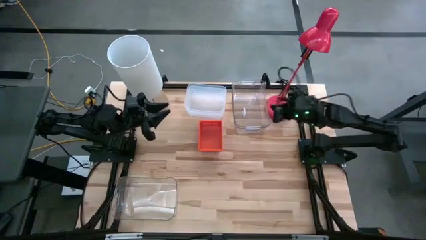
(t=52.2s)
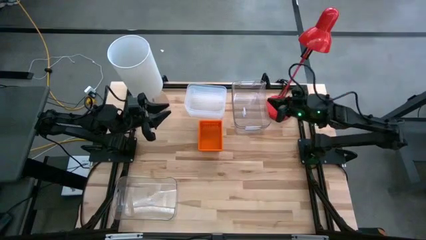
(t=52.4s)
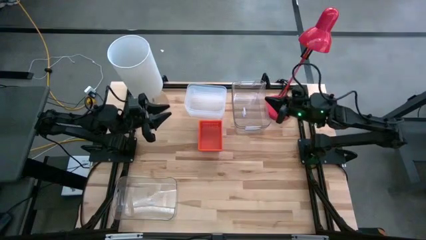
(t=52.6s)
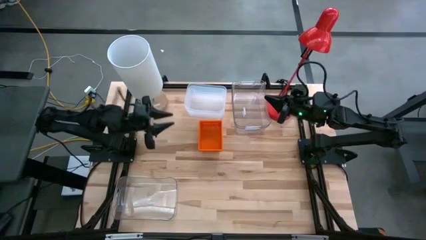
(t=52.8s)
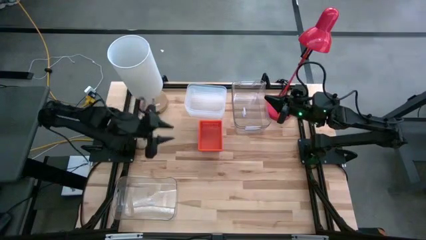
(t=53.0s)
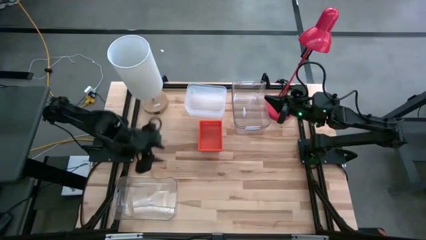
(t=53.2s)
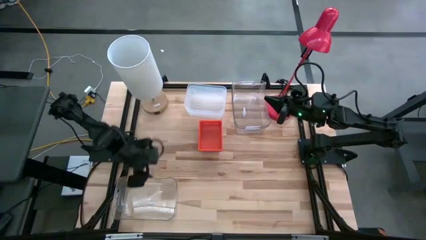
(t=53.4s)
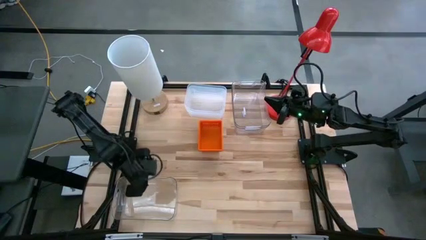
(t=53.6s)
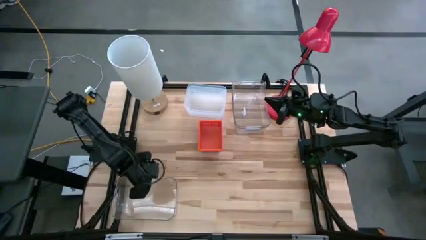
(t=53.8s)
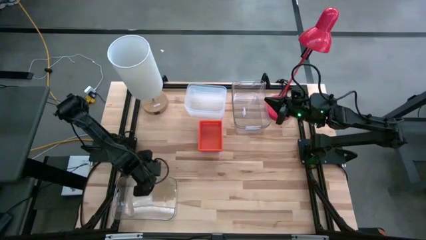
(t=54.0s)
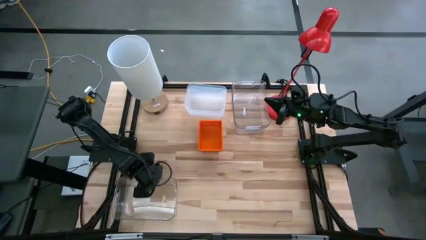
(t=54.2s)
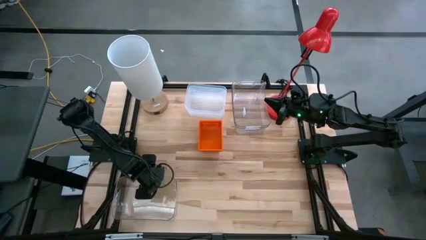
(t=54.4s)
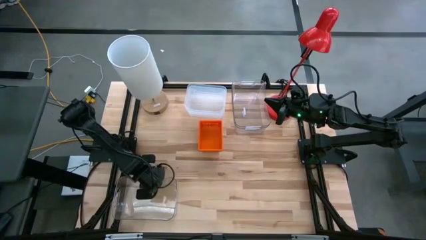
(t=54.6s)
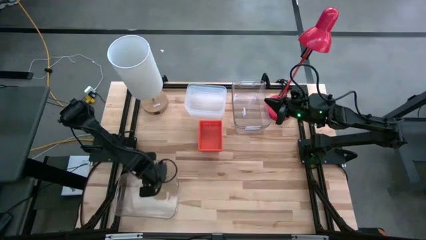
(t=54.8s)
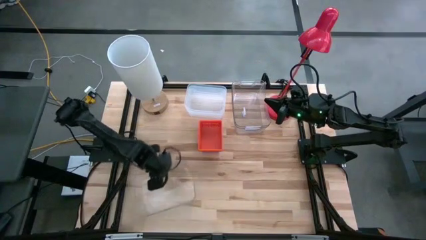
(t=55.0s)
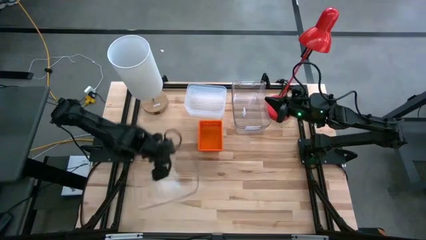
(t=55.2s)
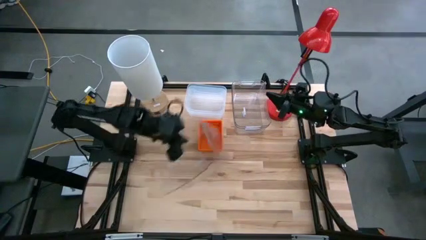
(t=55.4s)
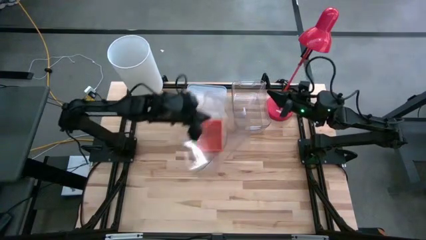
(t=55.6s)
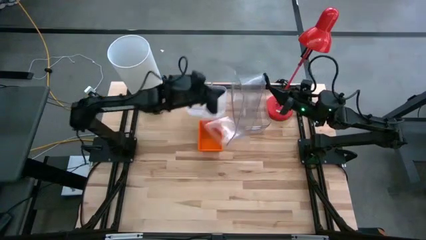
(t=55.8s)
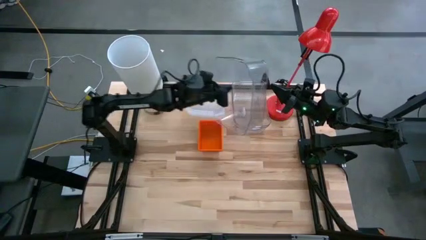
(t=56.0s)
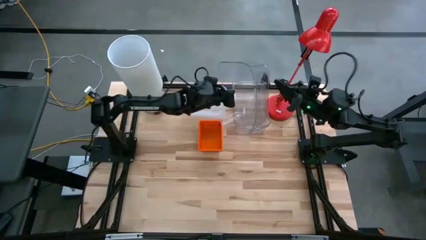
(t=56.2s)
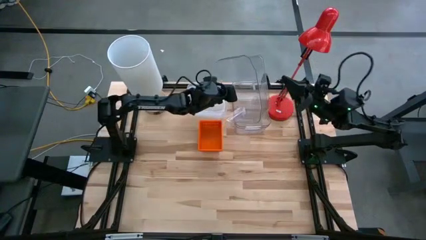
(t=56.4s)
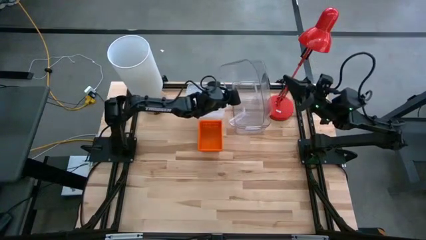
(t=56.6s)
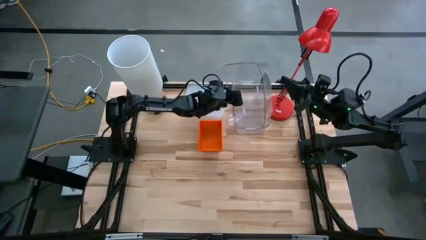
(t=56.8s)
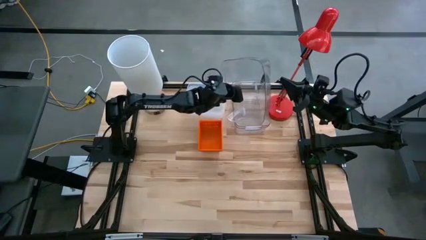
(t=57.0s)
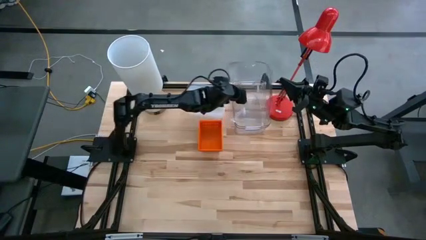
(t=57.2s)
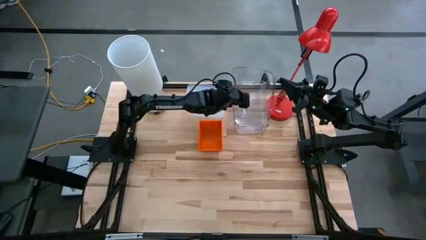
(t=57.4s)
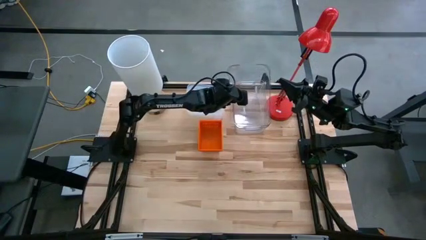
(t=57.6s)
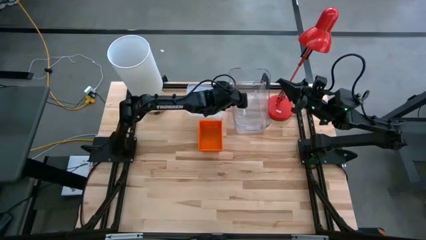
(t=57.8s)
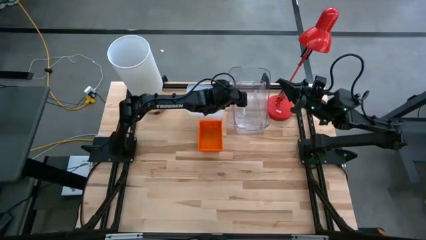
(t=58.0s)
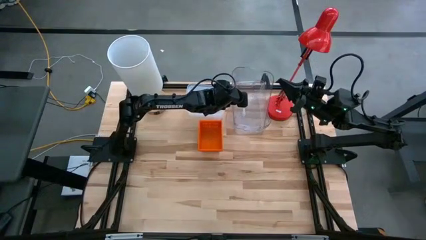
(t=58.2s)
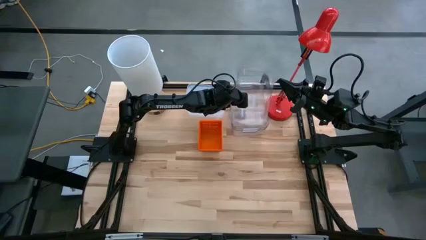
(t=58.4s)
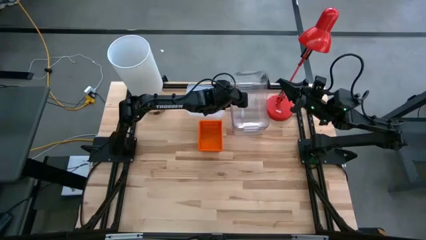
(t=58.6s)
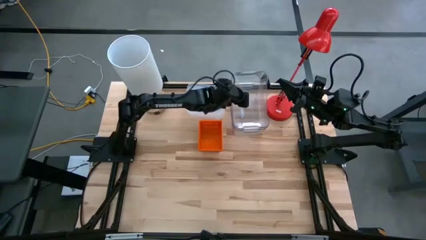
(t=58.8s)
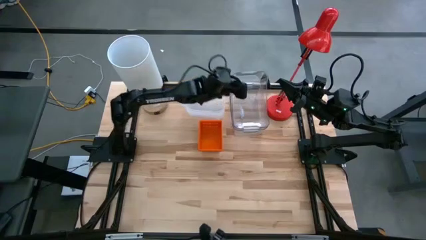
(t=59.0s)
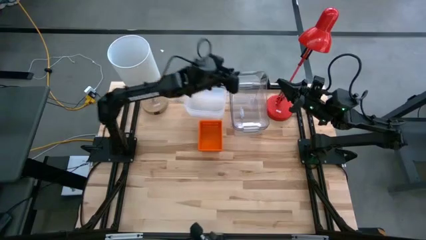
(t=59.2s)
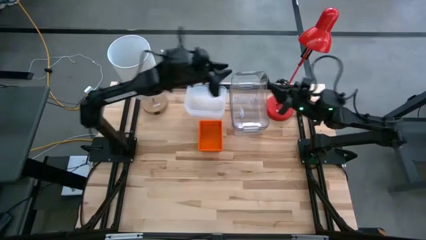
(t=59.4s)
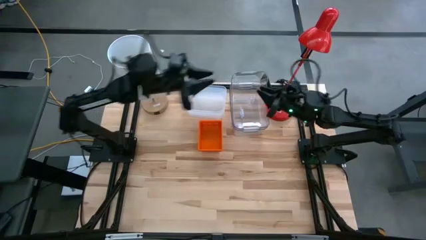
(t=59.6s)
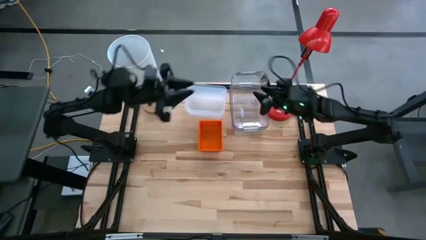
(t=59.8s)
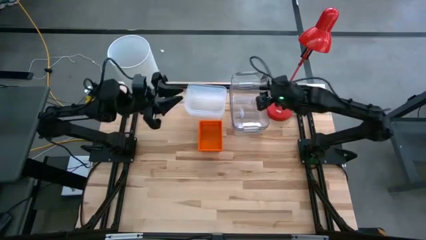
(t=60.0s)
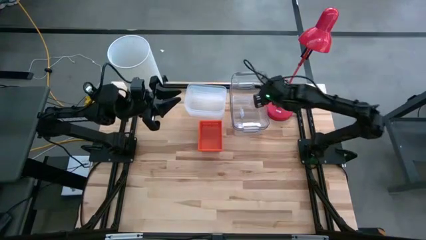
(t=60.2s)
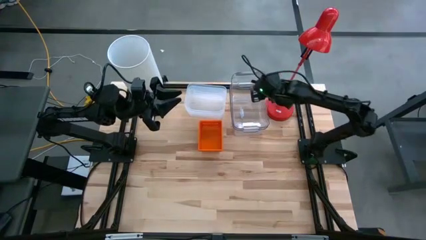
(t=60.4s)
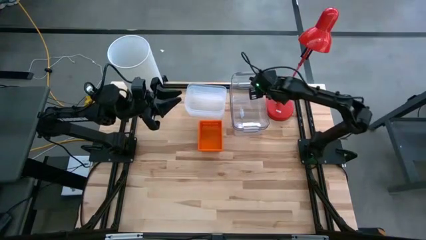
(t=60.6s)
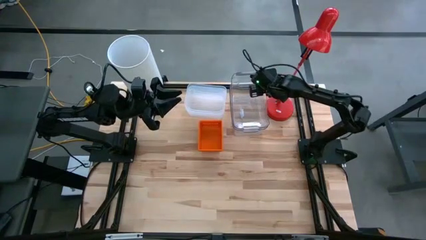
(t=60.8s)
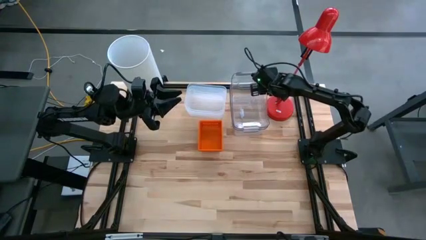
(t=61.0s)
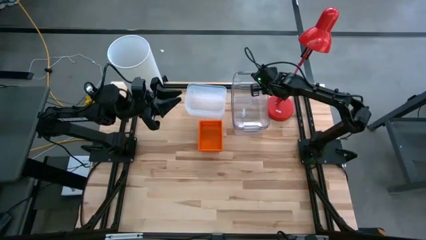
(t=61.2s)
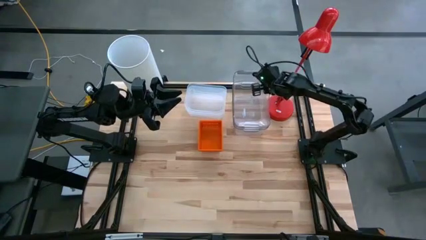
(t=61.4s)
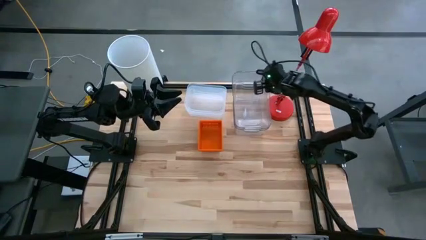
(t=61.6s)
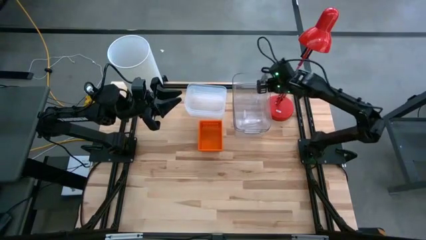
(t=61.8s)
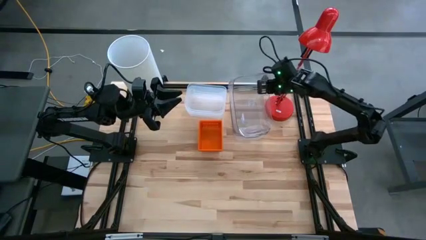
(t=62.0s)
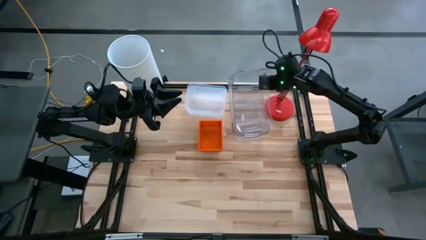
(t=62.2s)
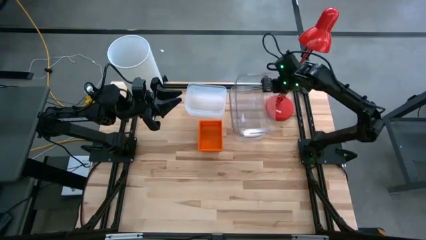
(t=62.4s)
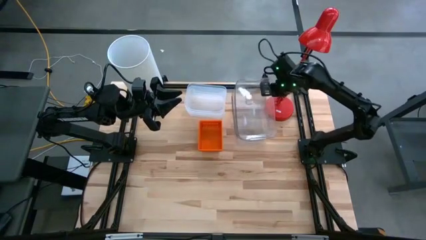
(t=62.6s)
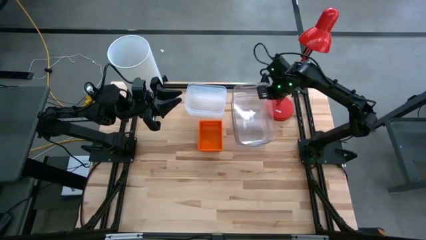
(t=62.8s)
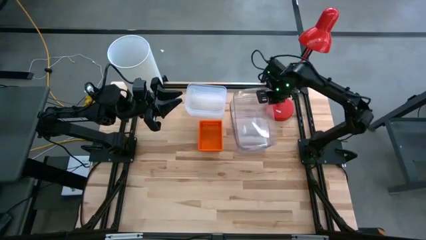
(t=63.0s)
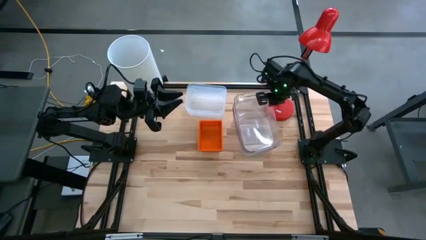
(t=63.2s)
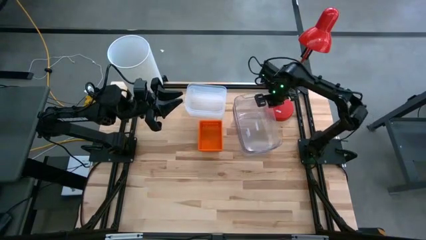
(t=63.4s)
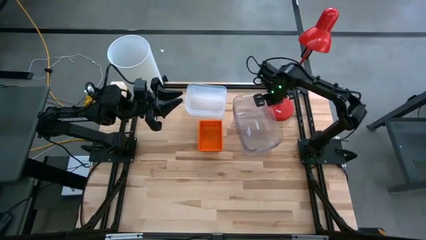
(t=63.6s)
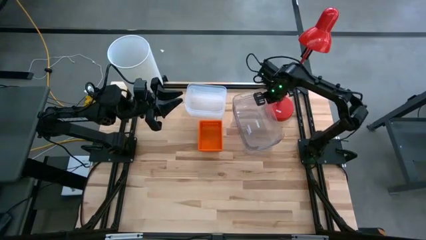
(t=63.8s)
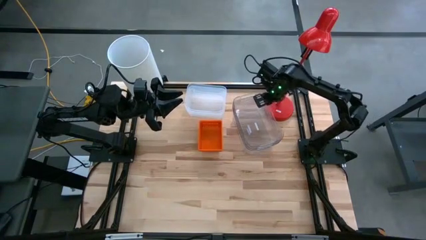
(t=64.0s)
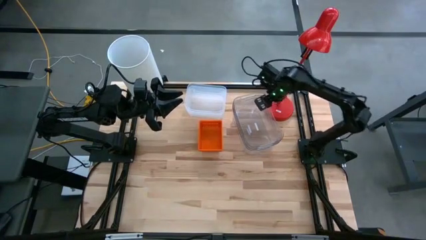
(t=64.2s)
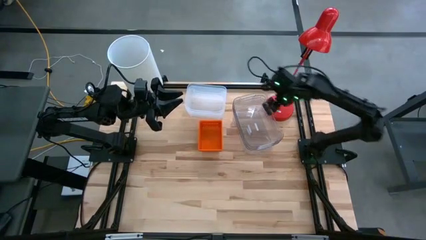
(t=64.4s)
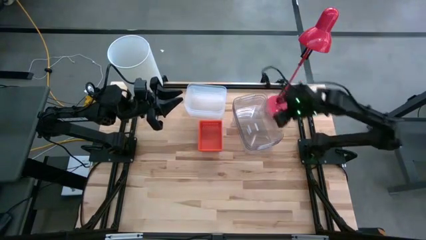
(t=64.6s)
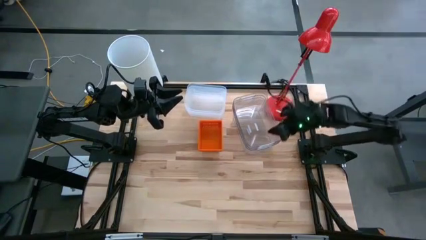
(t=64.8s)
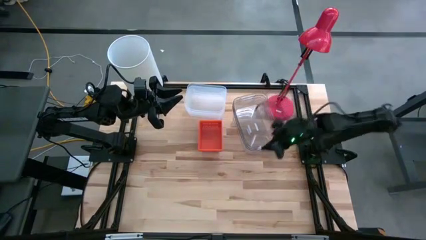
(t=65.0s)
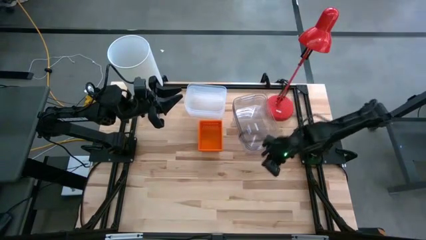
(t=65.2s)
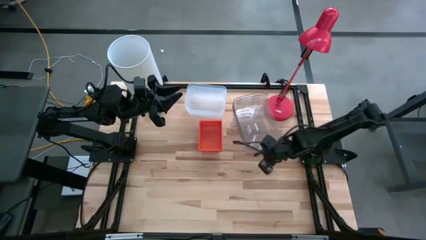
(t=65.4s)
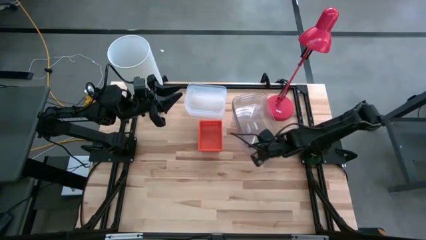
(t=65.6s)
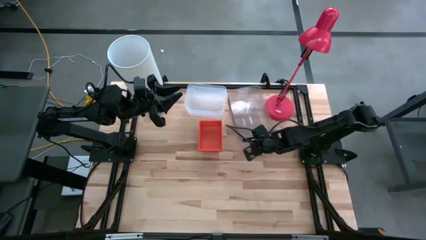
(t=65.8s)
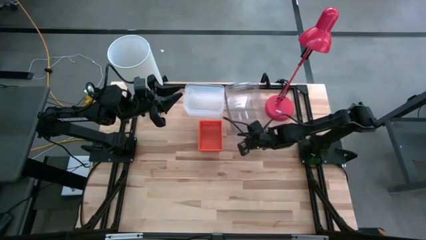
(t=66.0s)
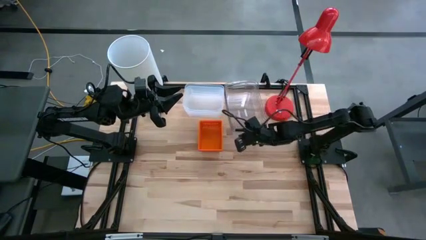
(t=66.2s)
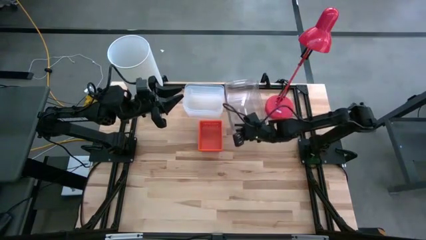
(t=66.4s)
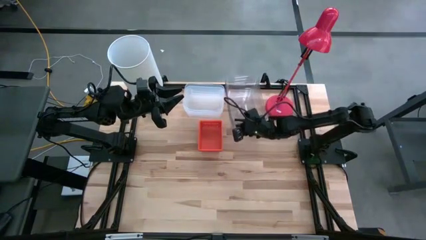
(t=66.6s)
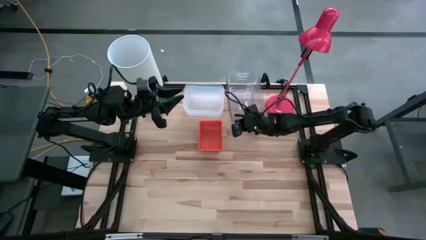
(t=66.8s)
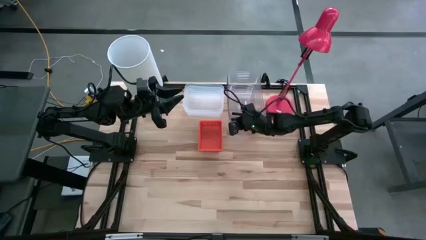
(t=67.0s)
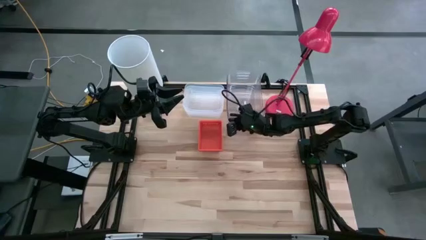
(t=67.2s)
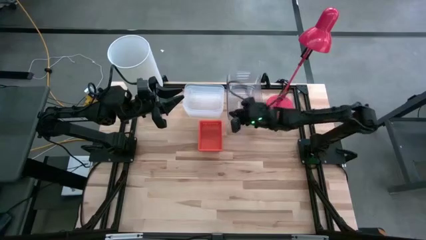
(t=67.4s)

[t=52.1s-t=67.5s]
Stack the bottom transparent bin on the top transparent bin
